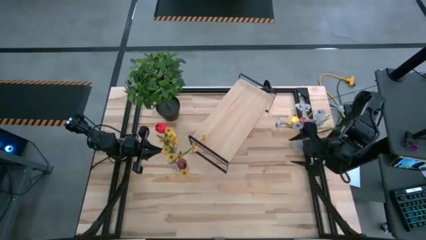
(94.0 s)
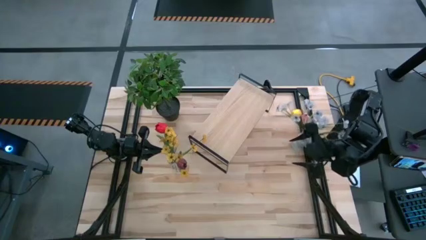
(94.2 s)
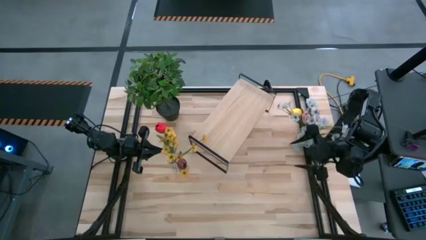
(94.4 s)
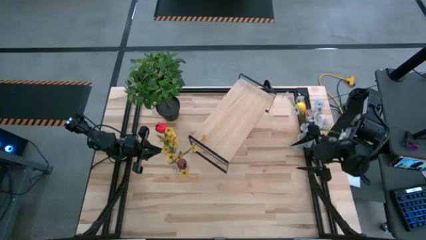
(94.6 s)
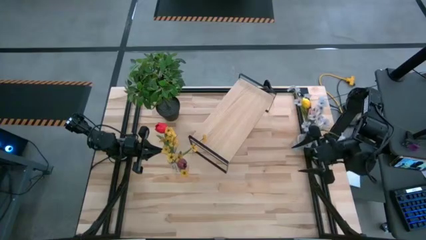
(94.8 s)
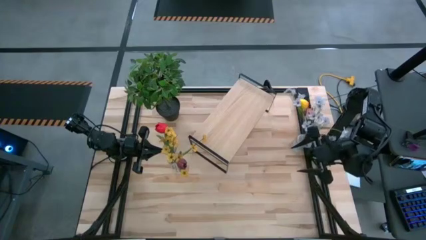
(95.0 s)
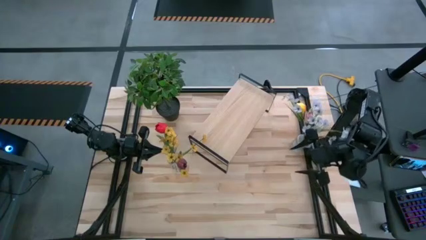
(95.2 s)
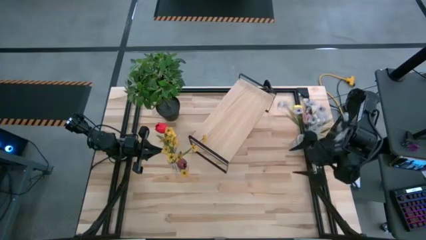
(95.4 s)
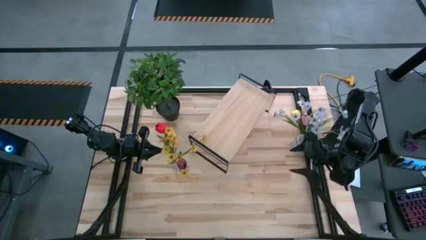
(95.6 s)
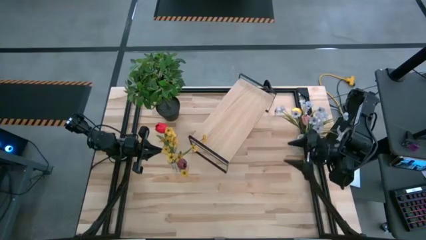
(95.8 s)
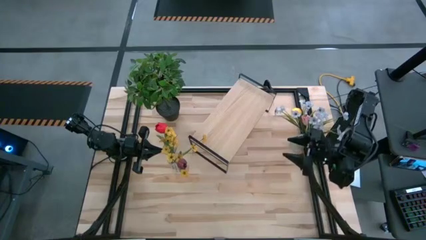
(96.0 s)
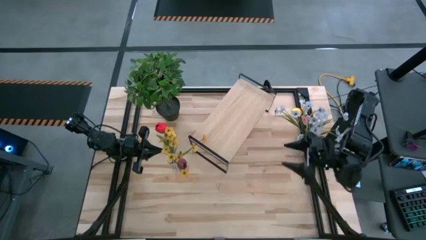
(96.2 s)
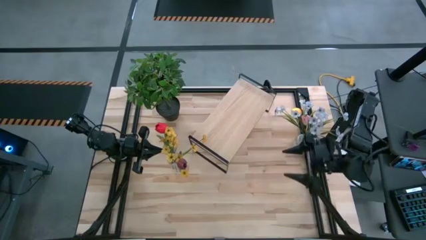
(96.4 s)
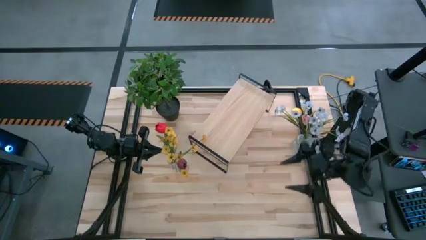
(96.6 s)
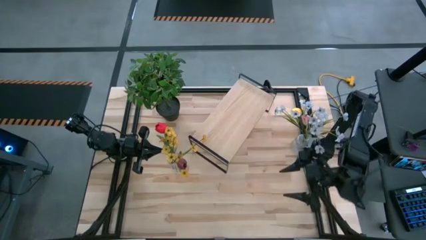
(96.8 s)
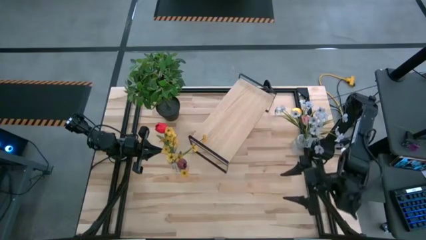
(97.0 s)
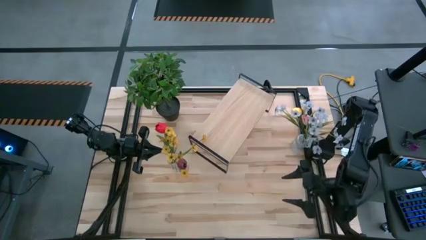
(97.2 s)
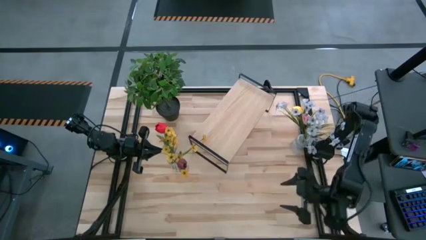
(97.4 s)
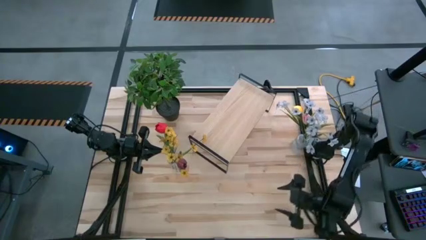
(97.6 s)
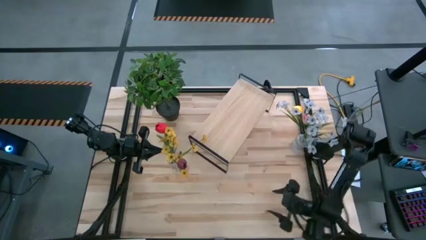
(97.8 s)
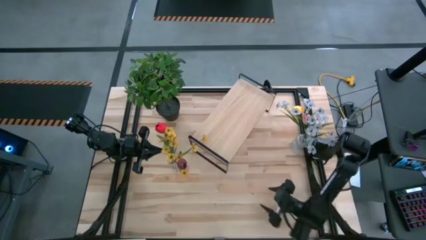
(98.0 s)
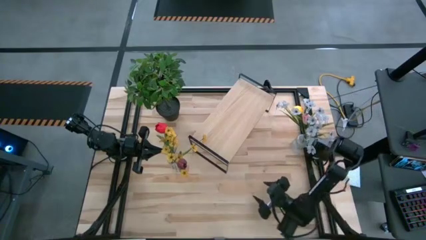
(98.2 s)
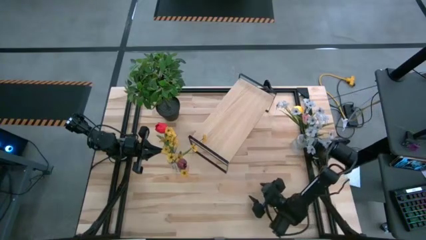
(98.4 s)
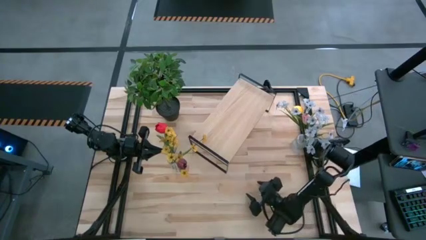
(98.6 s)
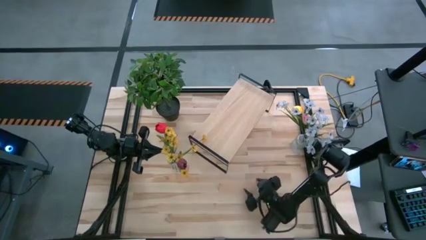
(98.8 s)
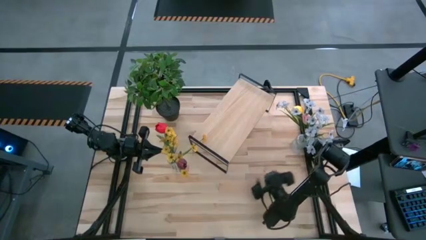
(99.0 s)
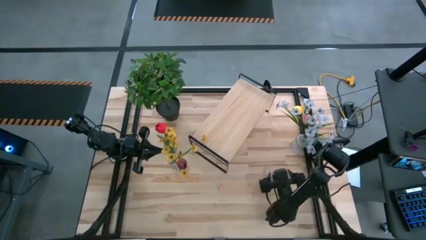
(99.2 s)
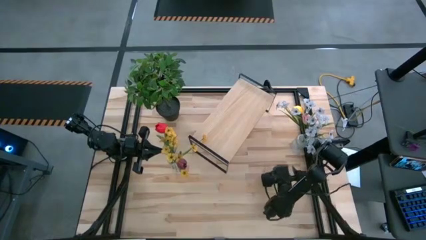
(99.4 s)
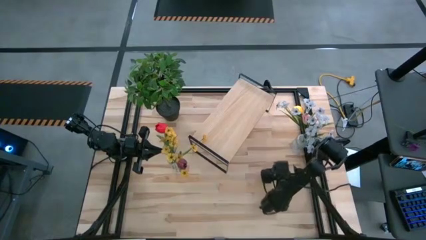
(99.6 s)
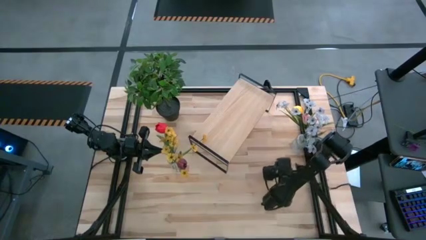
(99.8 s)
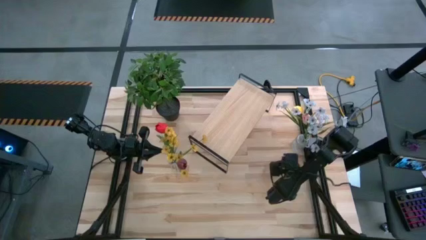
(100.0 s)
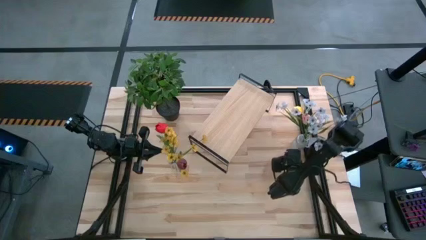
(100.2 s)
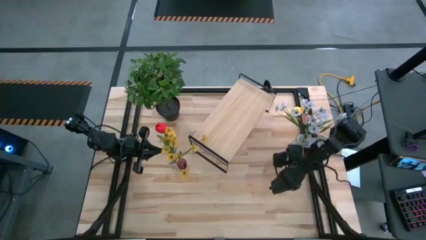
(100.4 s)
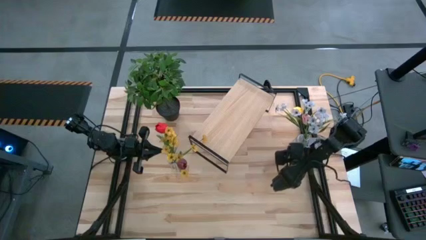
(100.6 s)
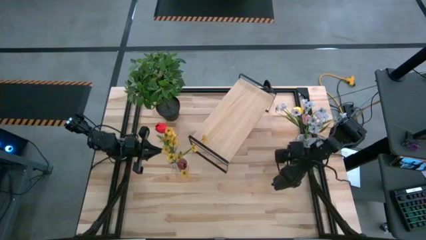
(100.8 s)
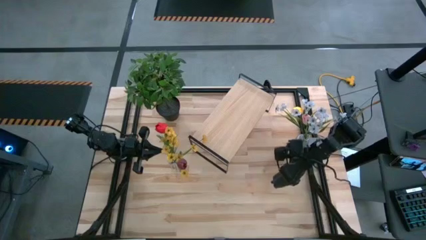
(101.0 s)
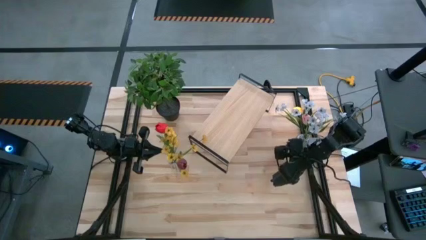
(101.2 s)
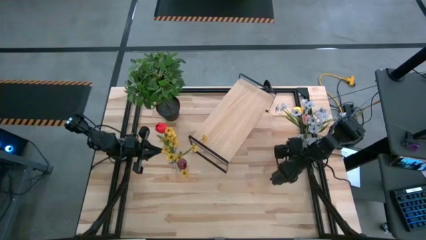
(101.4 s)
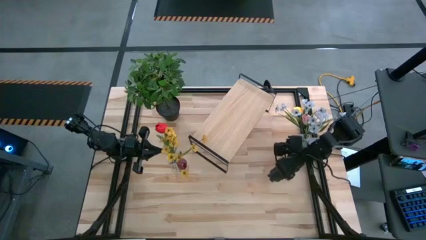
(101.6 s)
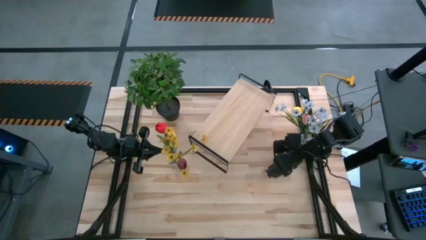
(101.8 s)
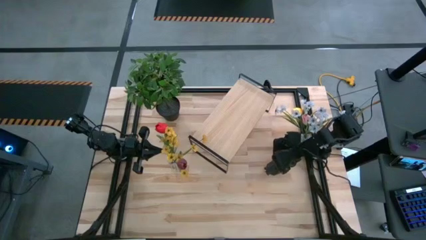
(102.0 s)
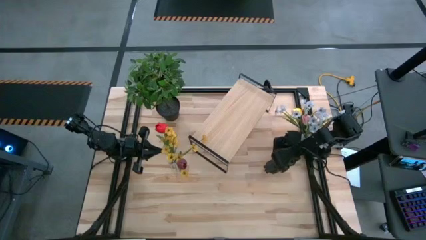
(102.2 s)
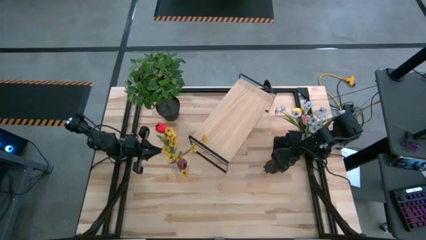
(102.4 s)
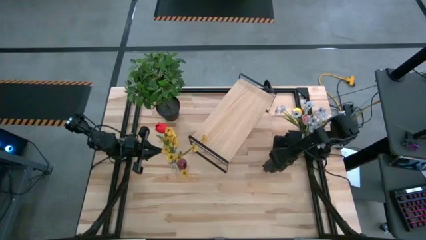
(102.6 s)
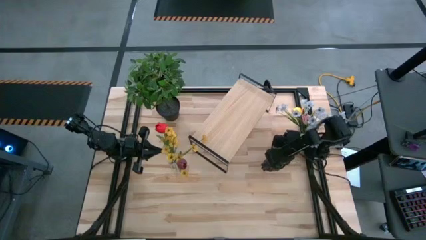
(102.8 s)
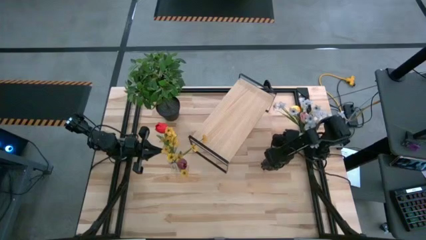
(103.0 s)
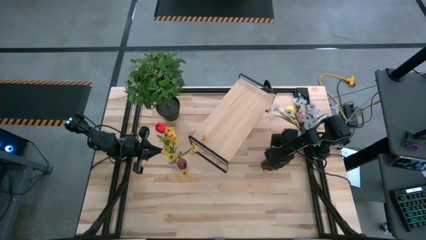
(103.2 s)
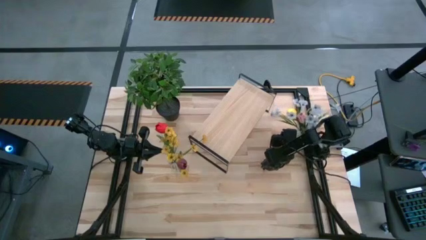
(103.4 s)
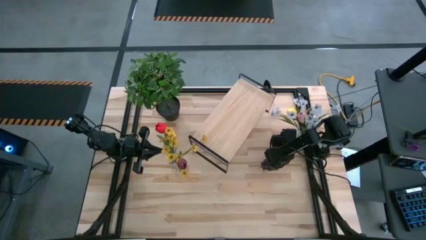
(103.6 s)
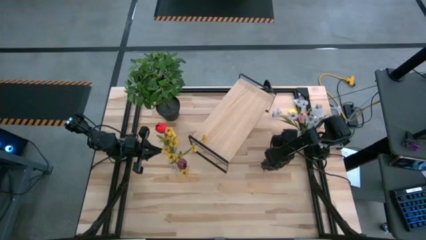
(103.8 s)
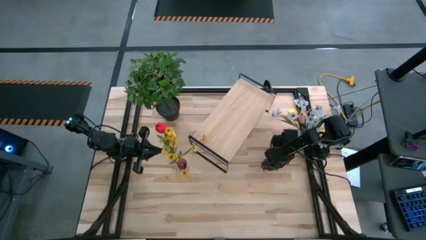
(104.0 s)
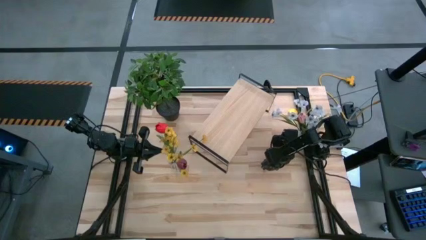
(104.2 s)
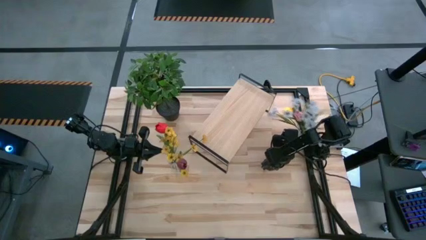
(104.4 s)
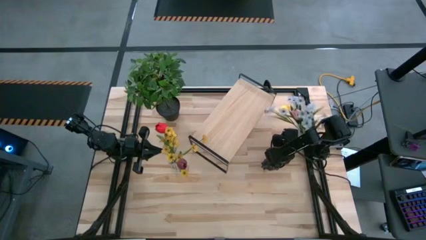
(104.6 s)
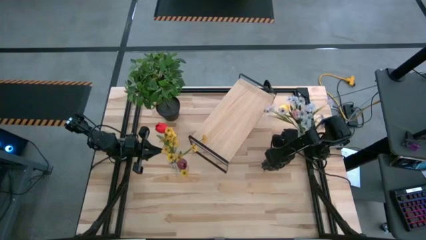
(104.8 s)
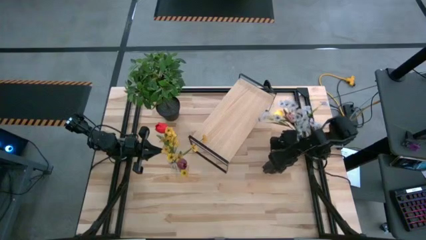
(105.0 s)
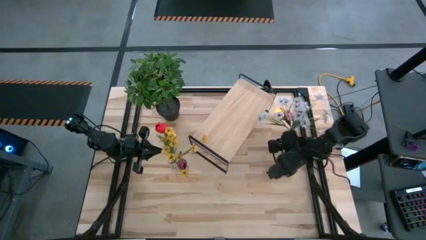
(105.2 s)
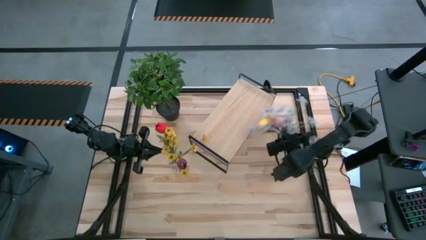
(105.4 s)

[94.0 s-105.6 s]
Task: Pick and place flowers into a vace then onto a shelf
Put the right flower vase on the shelf
